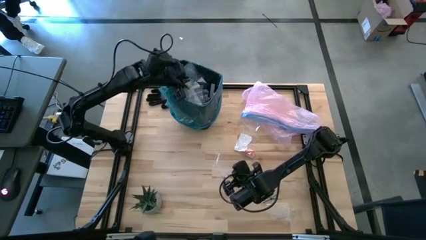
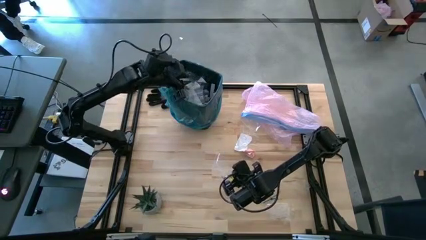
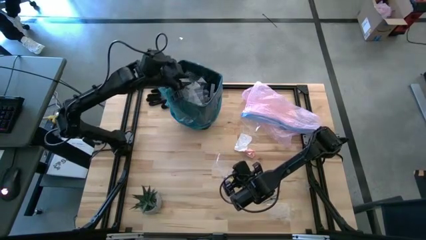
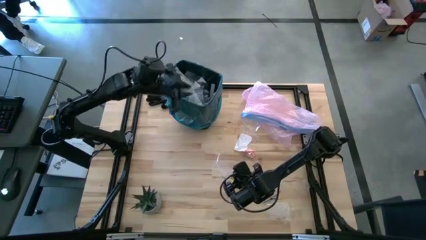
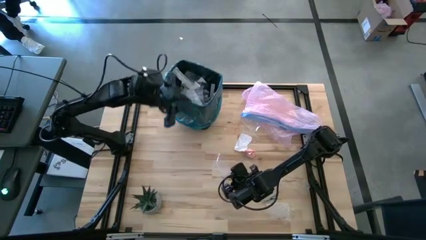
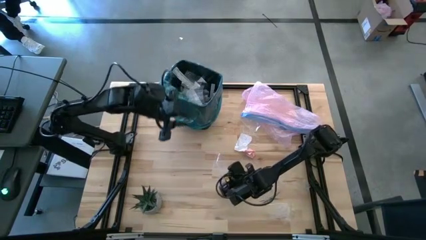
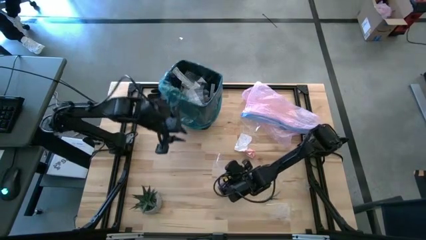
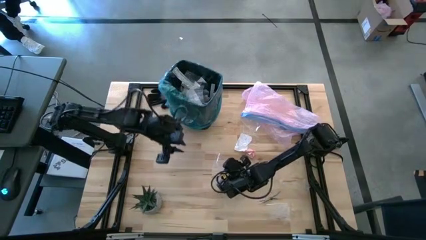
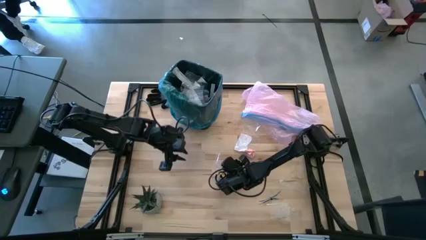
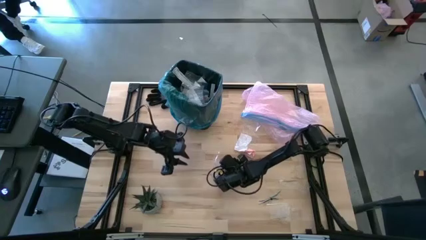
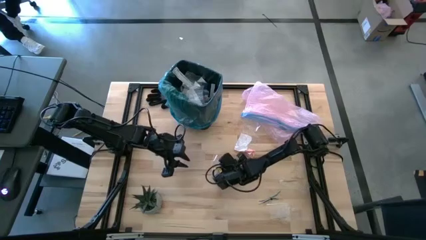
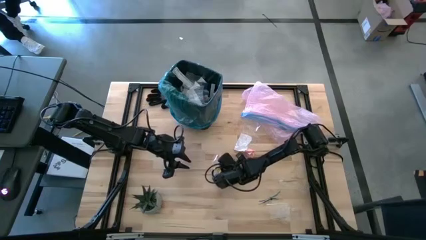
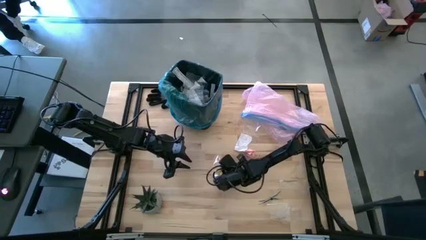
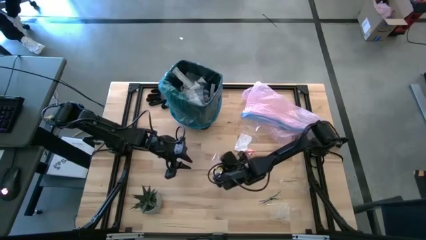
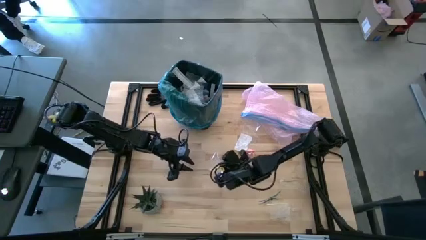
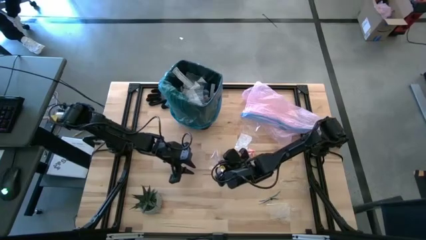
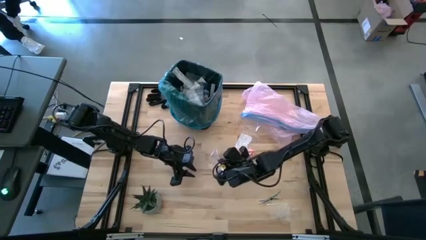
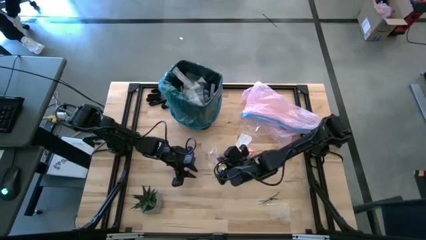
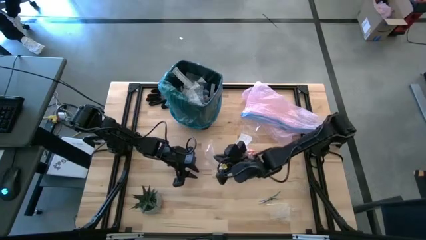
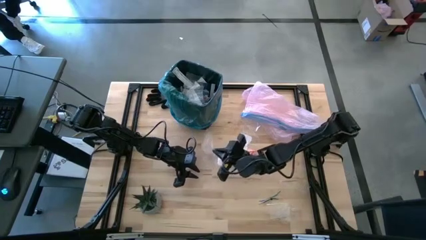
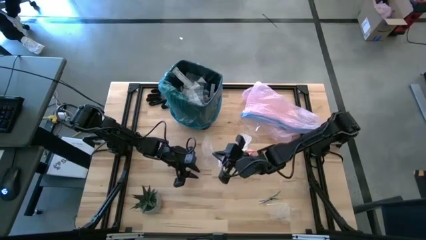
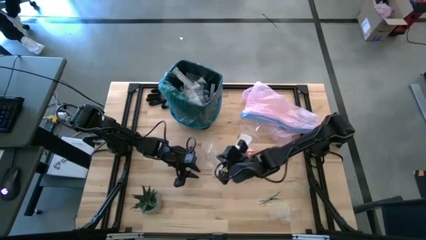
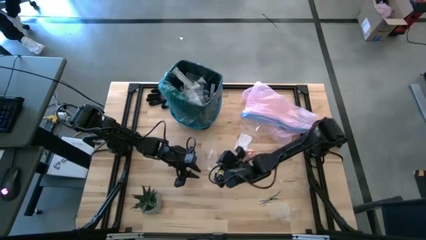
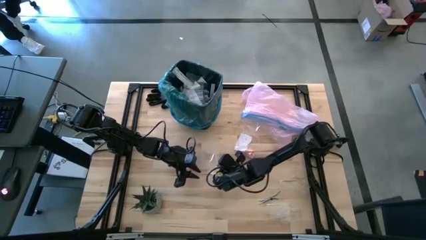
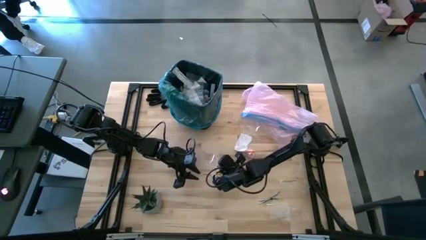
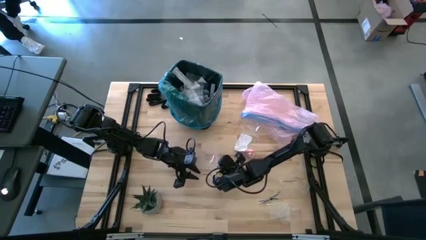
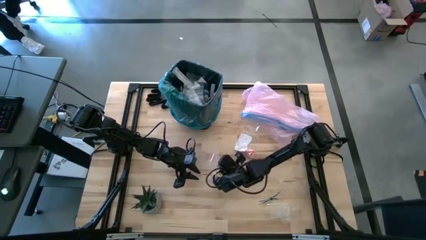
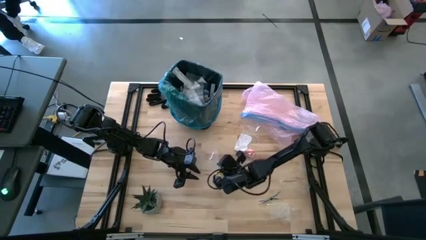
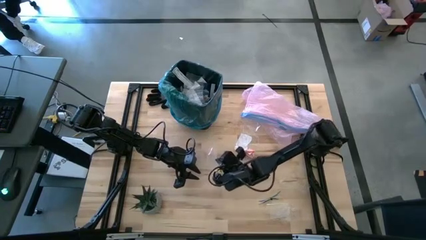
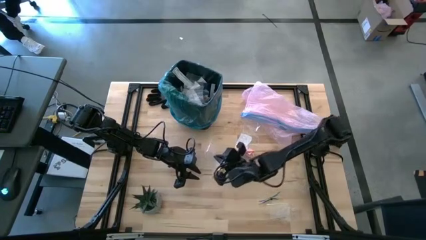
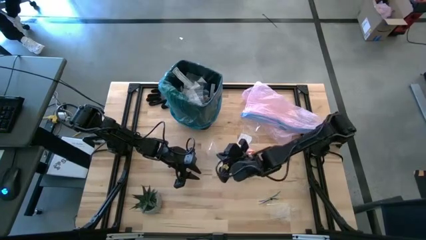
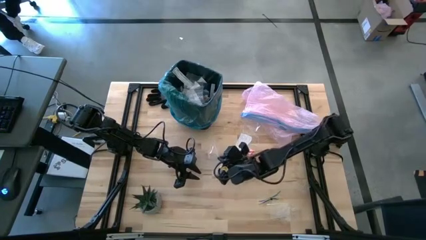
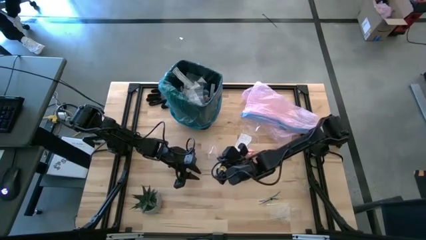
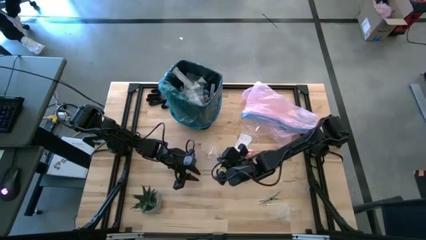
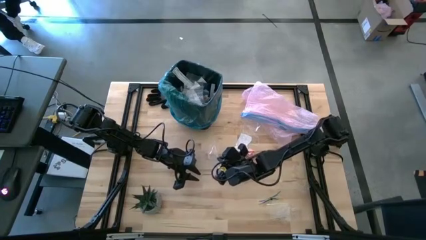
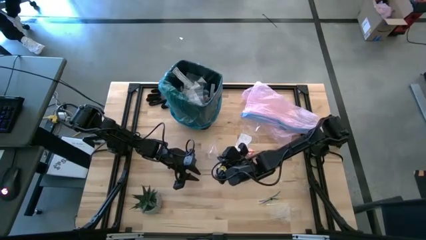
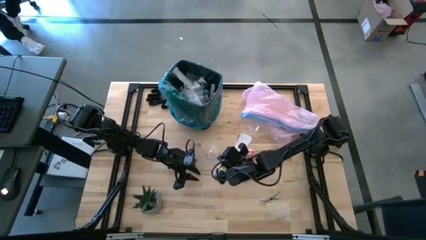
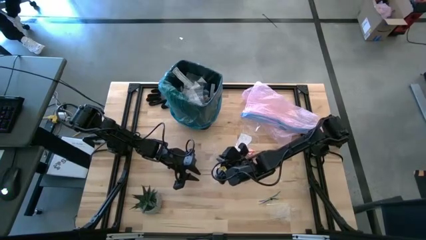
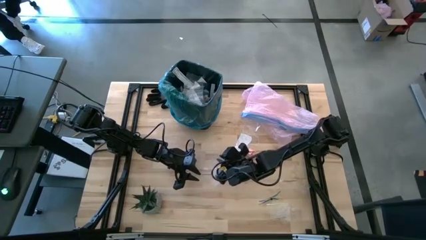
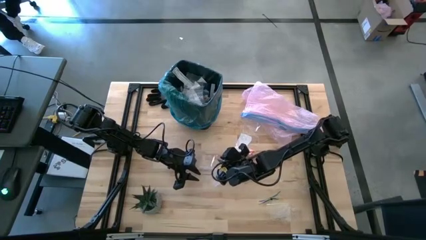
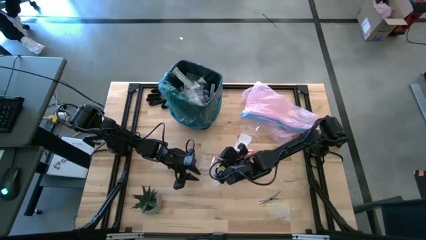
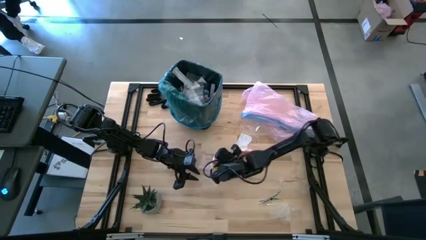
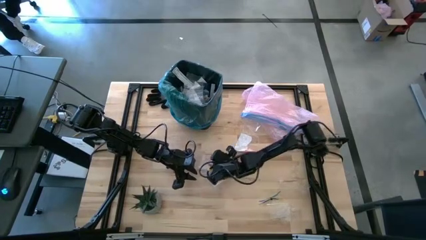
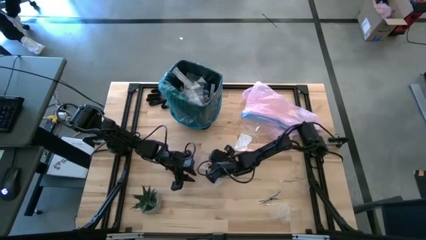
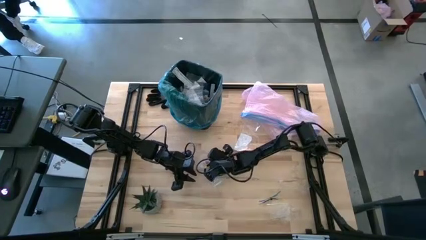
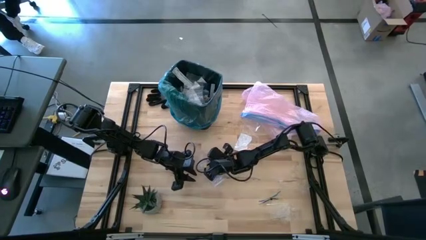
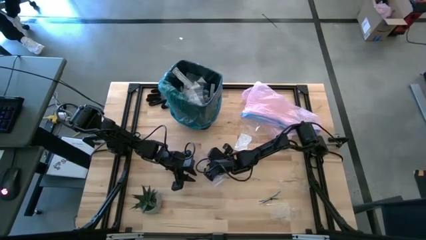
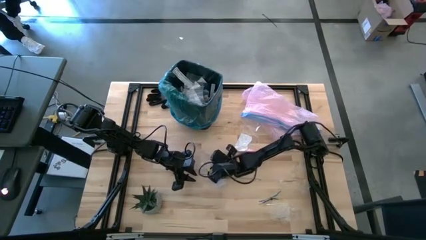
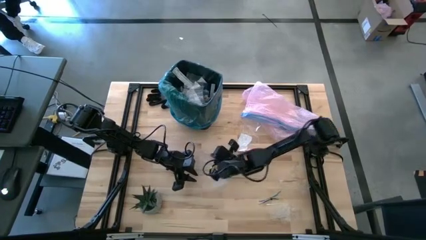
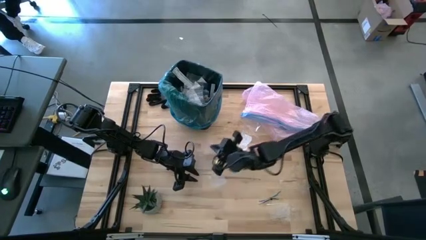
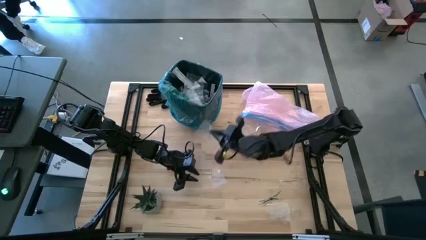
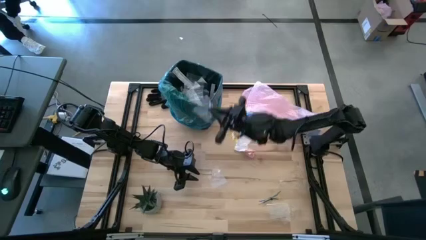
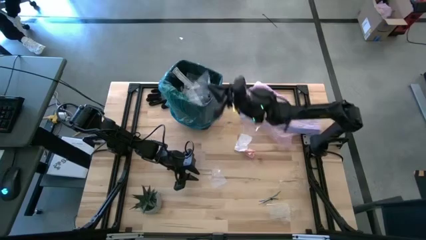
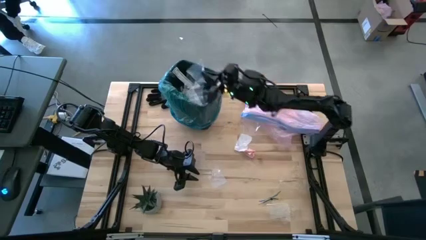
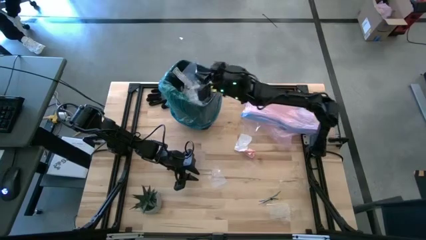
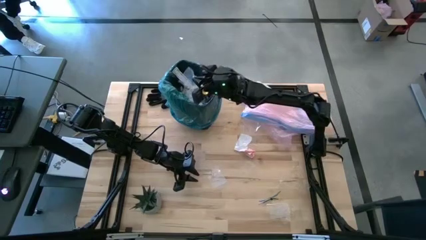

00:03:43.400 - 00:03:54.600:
Task: place trash/remove bag and relplace
Put the clear plastic into the trash bin

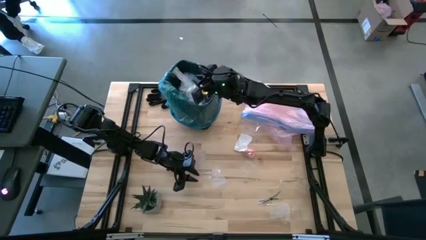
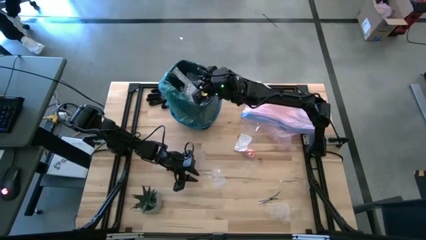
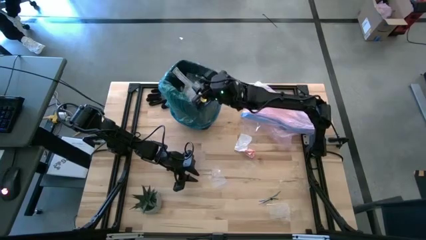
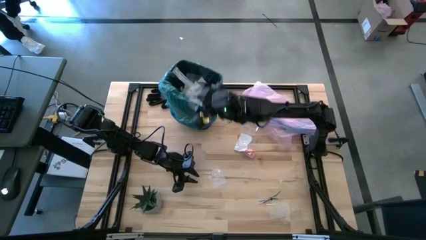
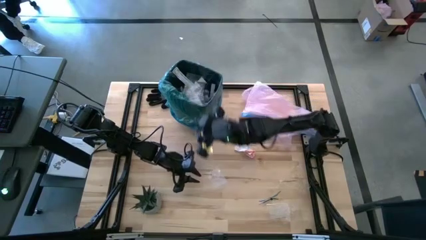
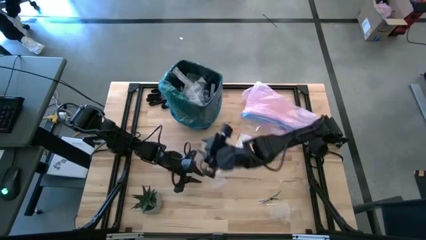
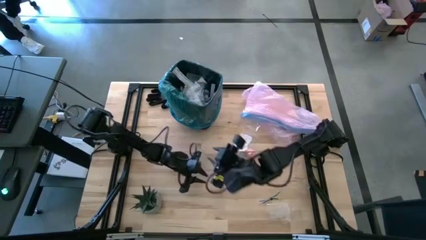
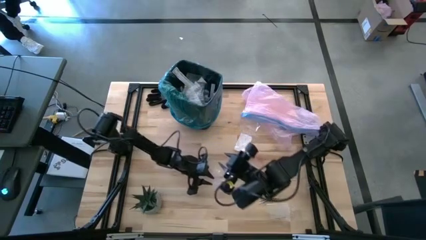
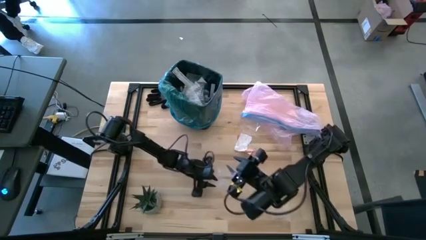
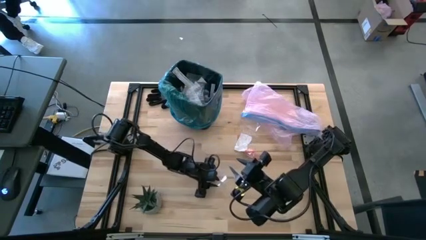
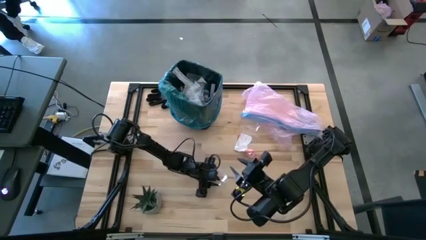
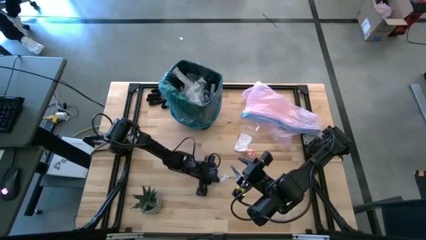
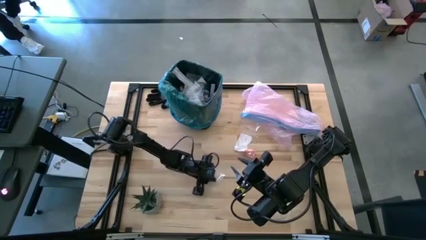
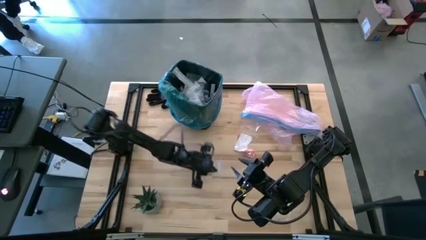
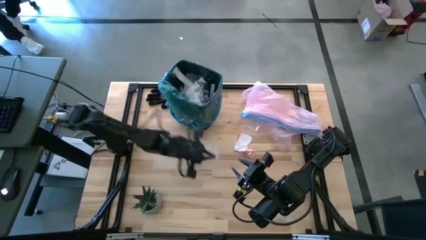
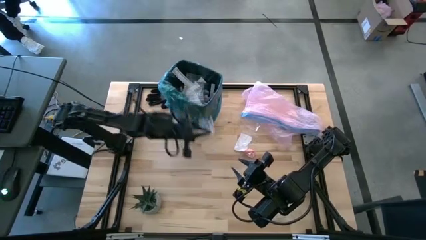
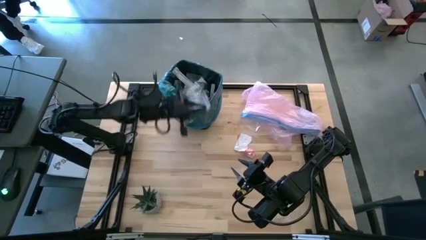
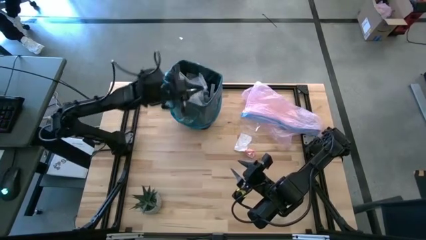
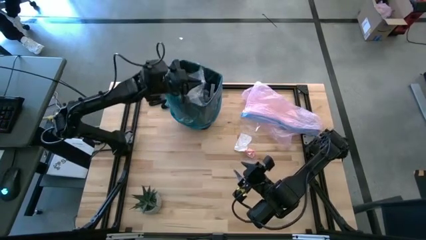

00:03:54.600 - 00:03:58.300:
Put the clear plastic into the trash bin

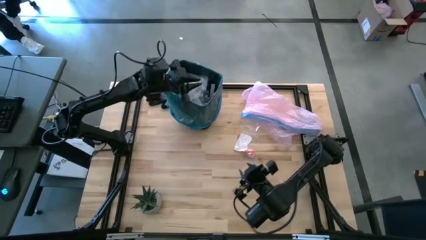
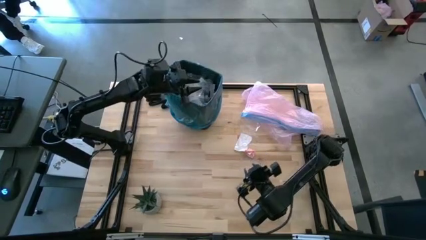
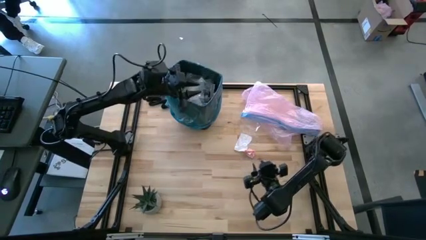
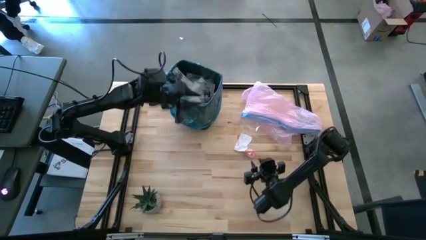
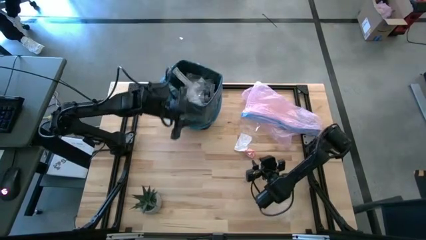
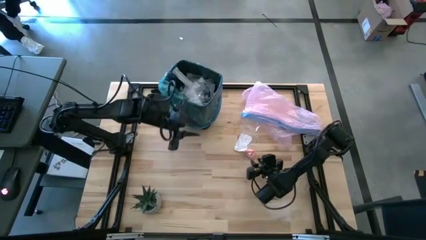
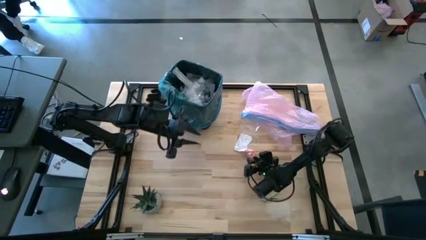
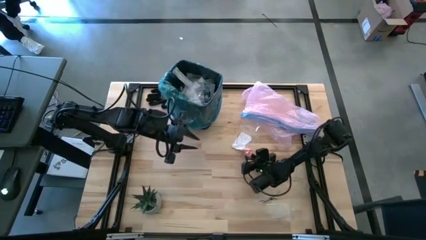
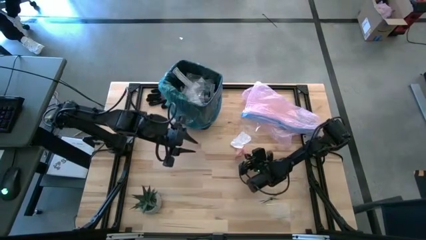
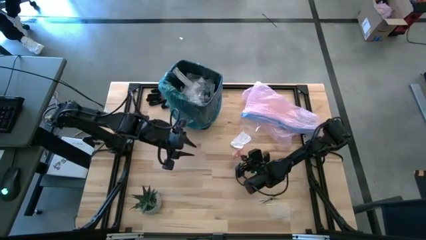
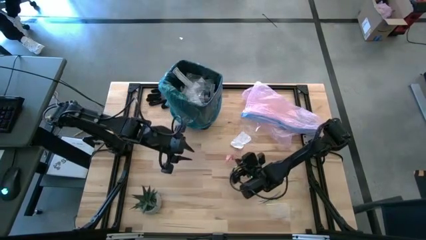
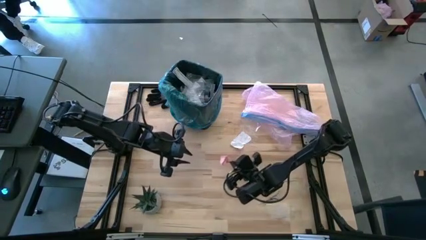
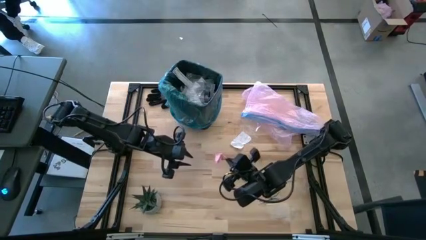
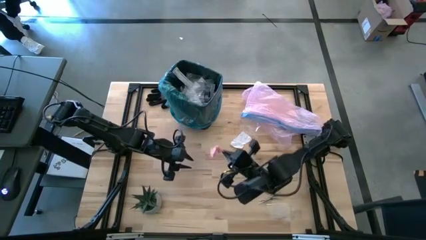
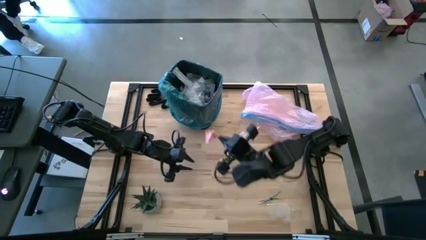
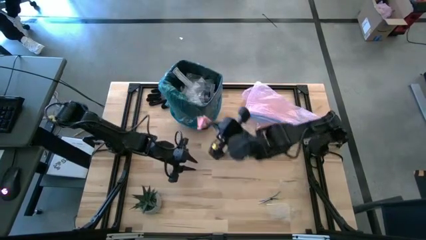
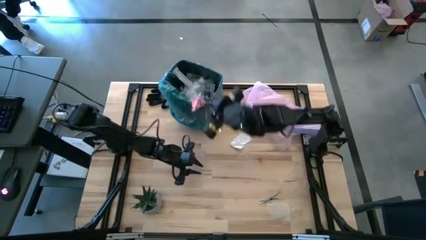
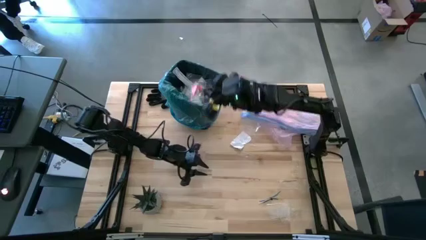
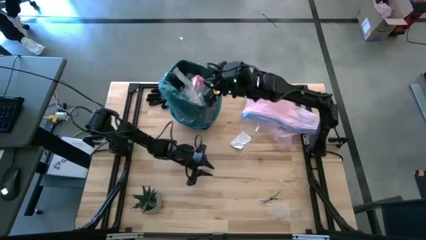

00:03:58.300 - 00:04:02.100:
Put the pink paper into the trash bin
